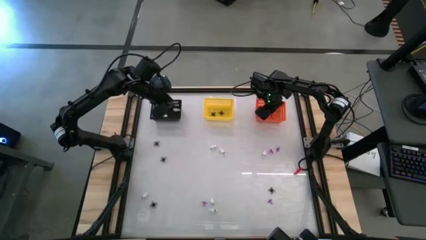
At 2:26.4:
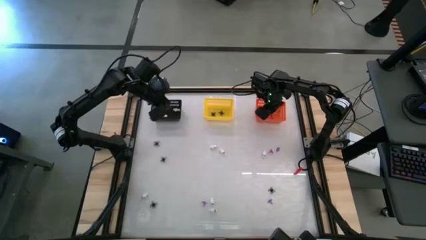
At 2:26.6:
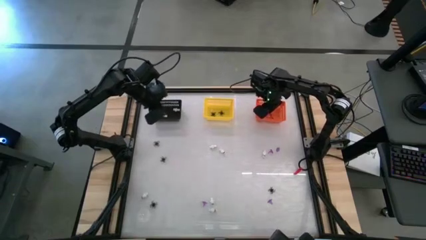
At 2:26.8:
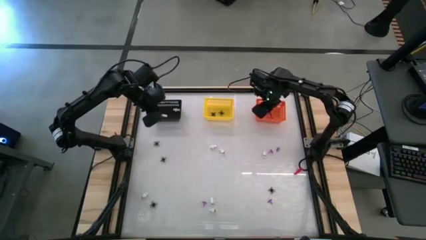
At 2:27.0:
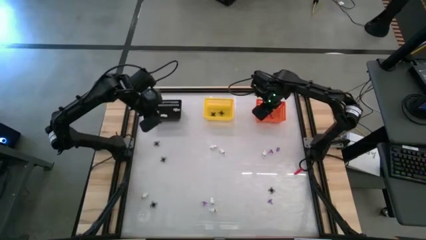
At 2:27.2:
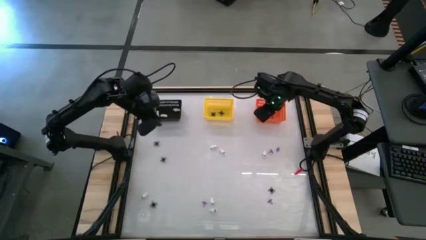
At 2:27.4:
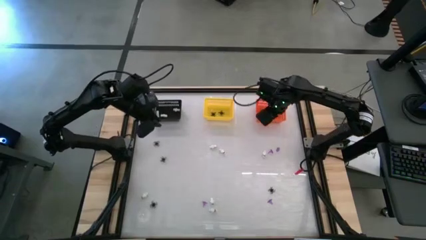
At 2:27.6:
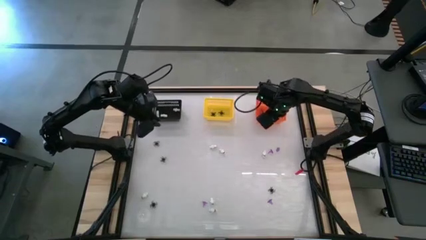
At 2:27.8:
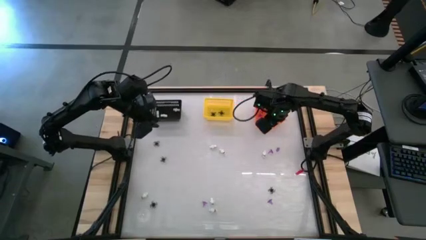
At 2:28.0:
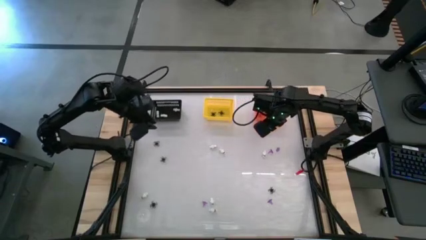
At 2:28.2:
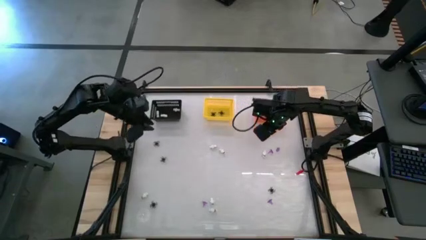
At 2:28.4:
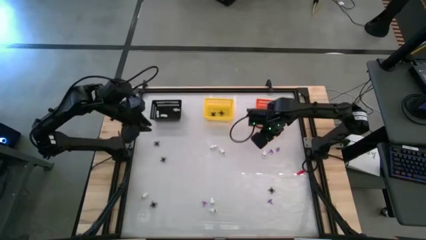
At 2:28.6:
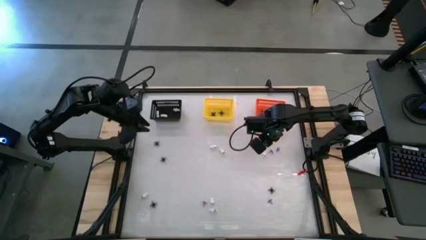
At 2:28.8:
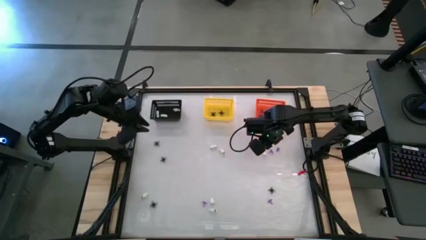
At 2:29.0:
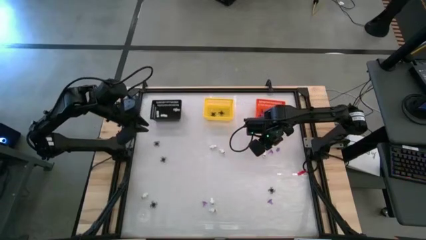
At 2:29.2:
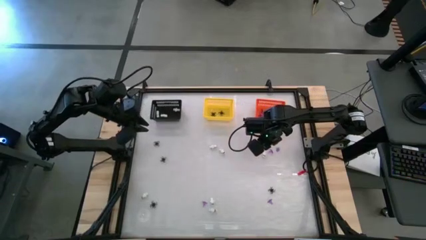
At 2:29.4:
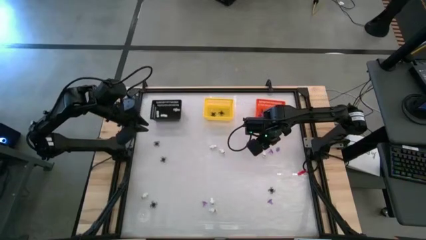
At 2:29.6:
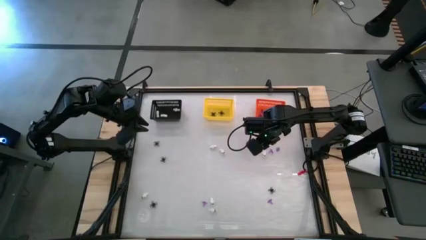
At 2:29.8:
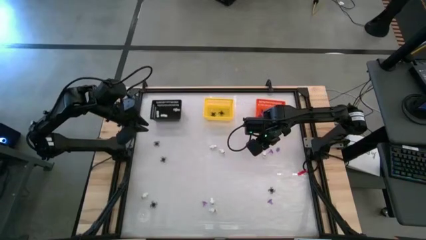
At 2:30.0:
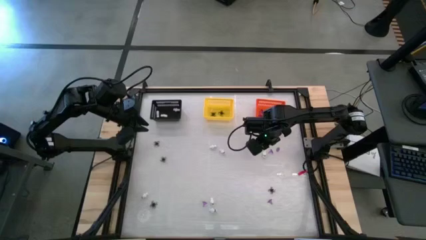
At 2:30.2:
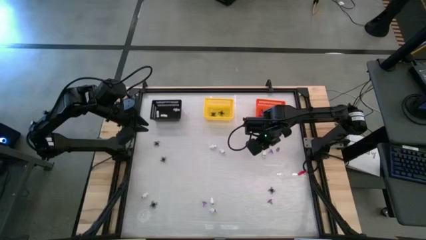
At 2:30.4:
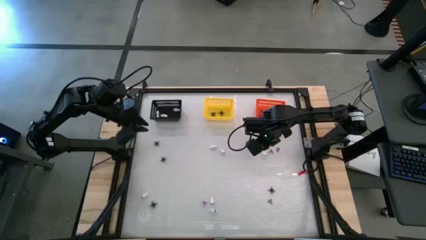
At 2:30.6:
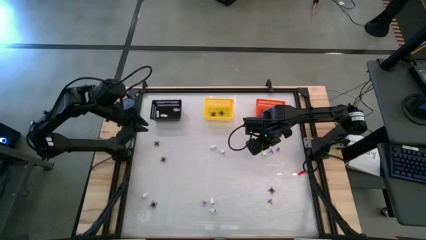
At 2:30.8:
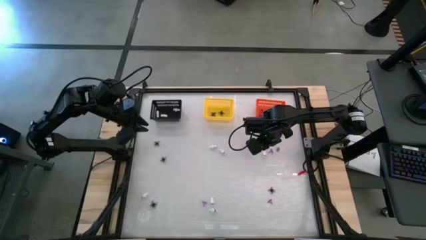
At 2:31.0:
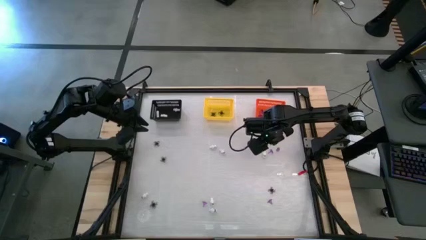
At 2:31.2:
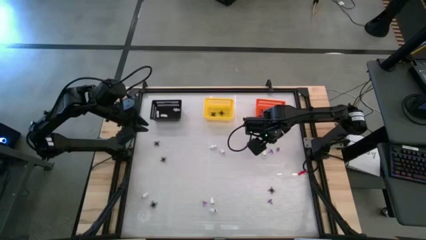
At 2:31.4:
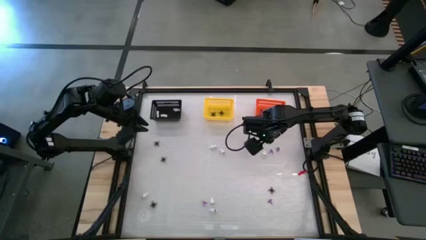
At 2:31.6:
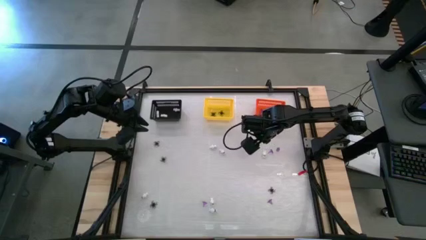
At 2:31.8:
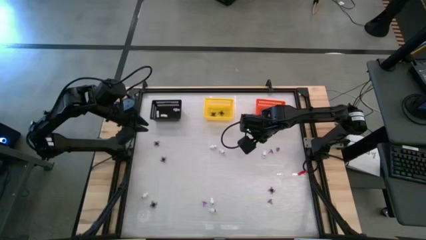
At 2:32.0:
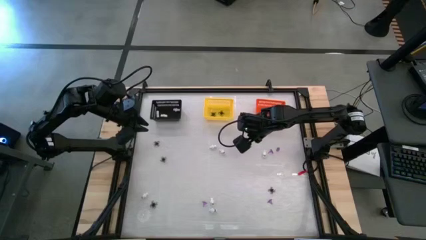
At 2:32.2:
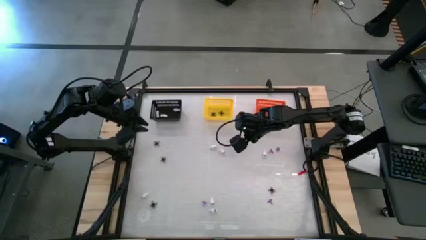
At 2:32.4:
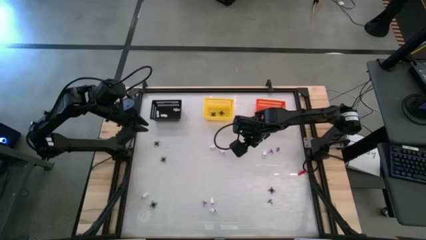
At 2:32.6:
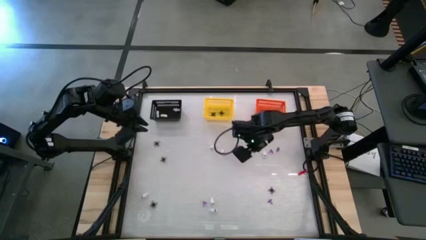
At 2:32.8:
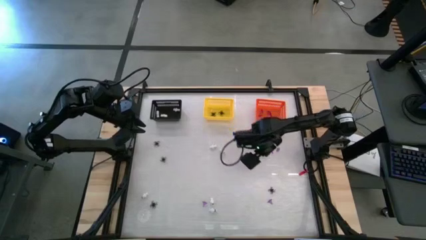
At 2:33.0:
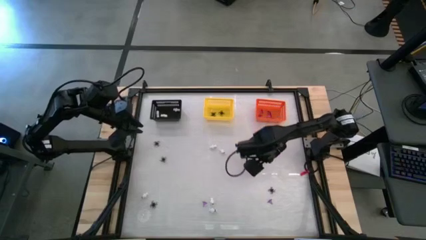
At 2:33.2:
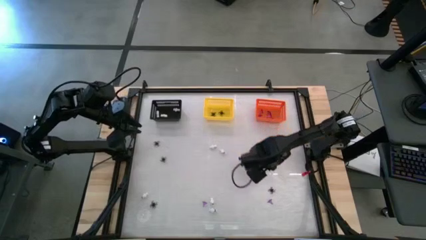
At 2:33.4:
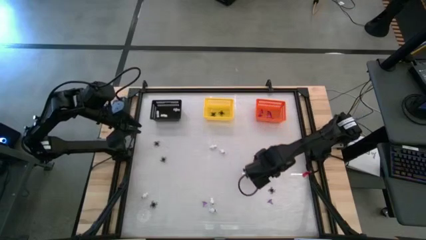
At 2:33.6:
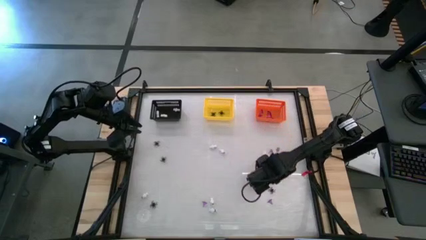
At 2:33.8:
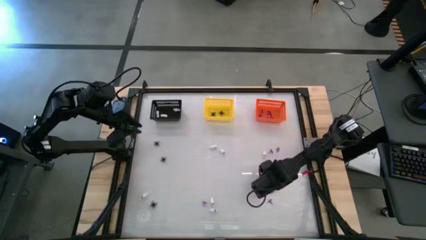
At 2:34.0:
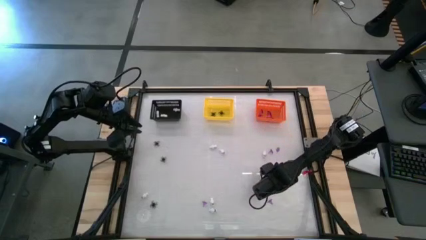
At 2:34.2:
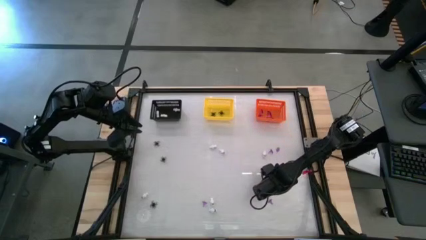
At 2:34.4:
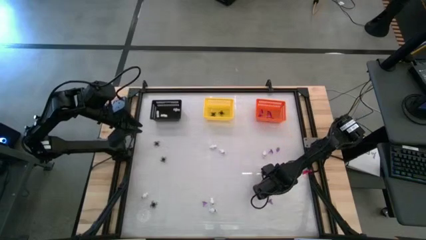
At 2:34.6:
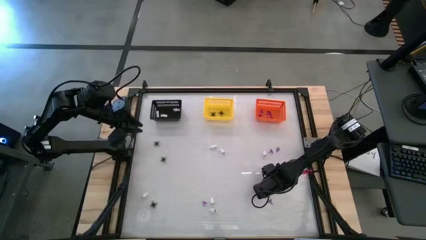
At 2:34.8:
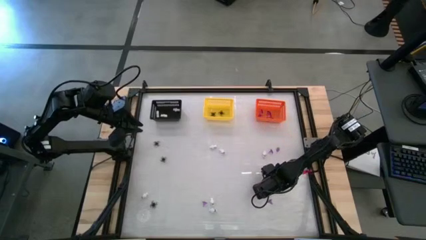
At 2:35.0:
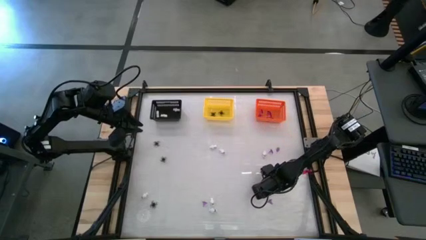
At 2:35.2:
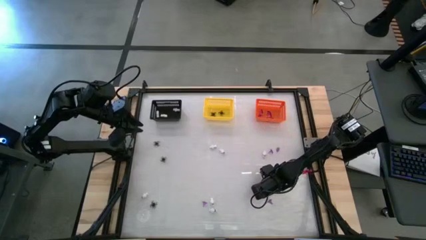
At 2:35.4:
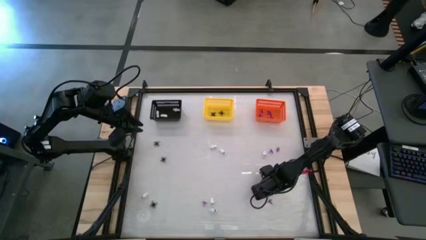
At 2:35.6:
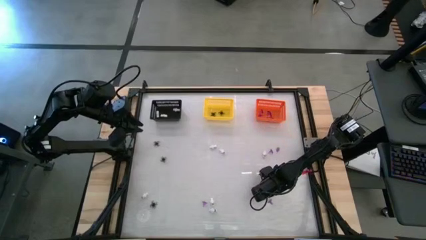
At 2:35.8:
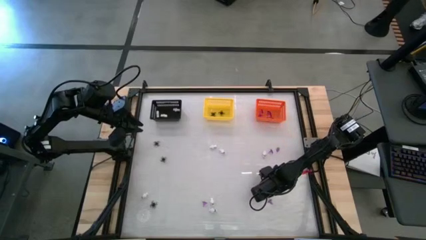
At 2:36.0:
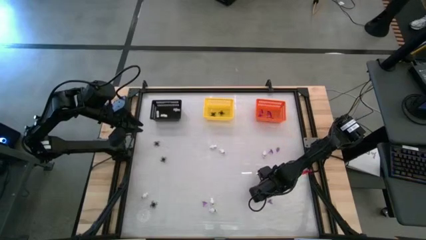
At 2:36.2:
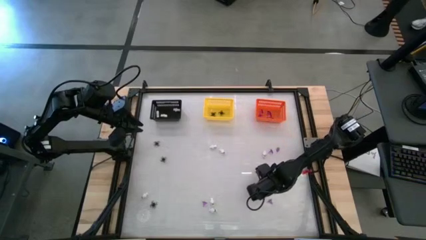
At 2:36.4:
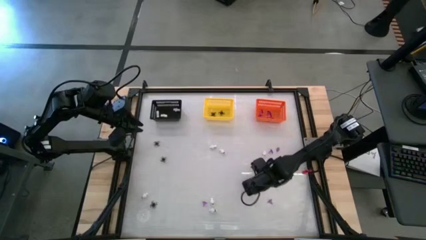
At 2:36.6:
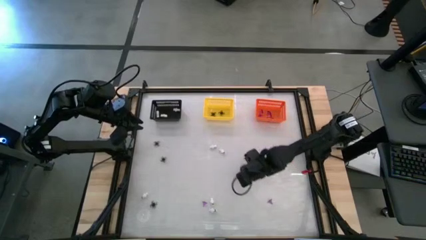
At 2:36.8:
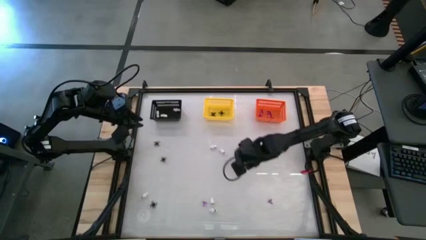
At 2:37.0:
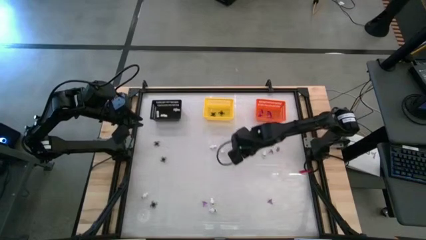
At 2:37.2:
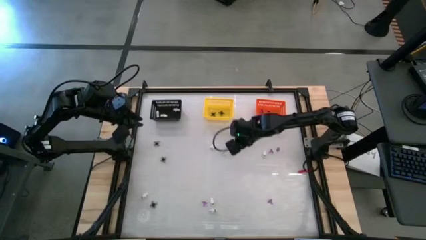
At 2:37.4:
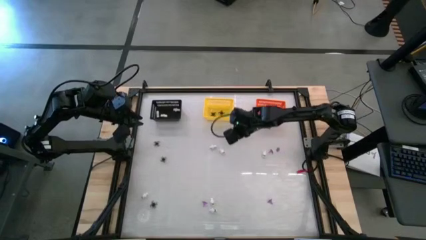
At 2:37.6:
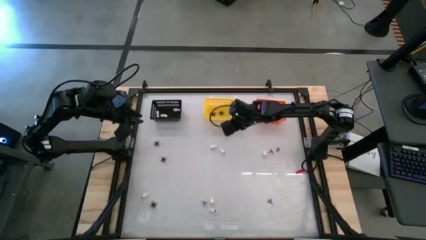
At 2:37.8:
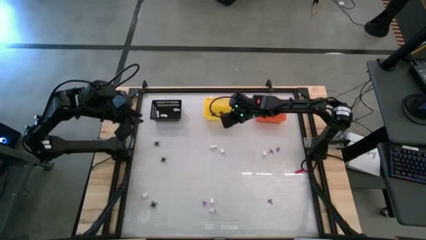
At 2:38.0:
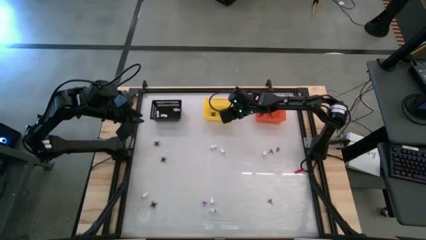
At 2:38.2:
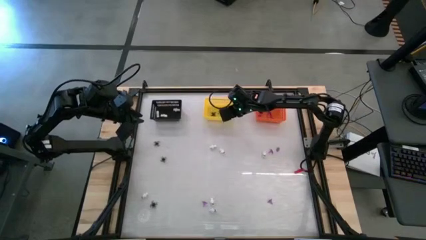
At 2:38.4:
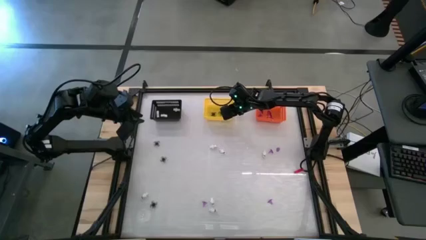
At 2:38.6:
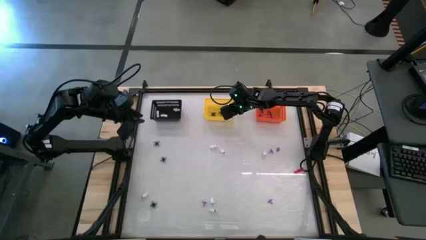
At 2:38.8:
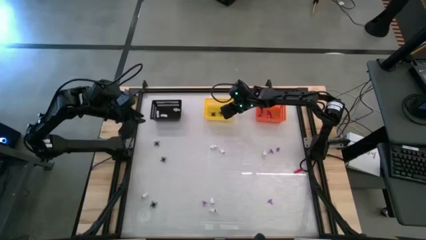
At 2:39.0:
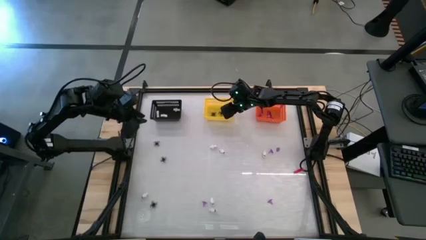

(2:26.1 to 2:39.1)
Task: Sort Halloween decoration
Put the black spider toy into the yellow basket

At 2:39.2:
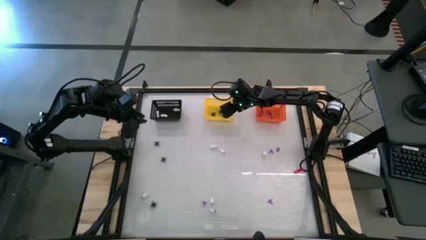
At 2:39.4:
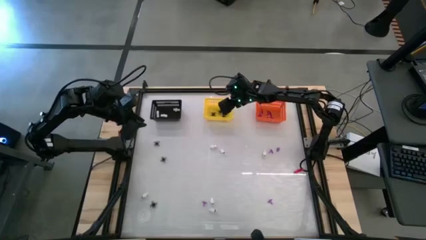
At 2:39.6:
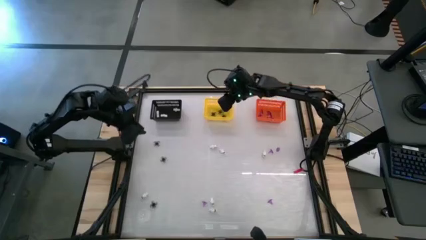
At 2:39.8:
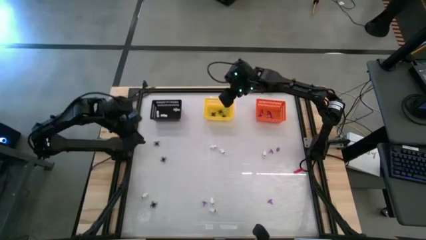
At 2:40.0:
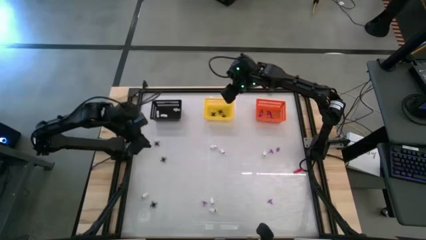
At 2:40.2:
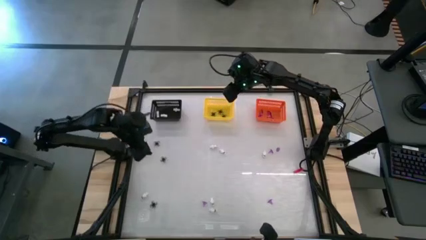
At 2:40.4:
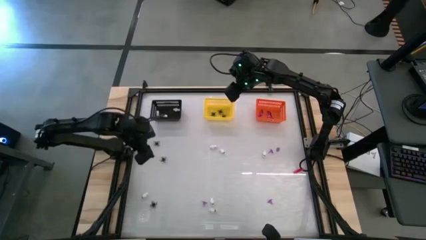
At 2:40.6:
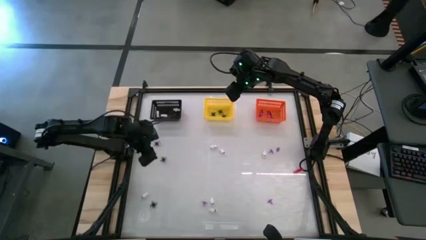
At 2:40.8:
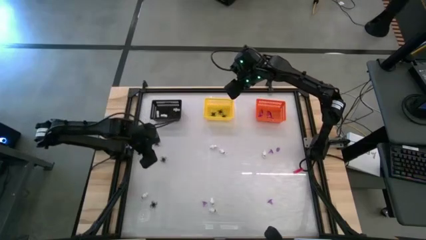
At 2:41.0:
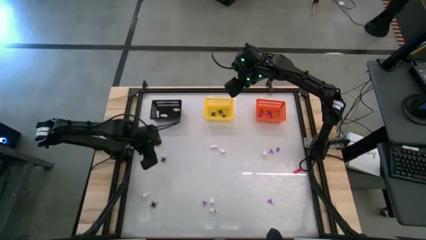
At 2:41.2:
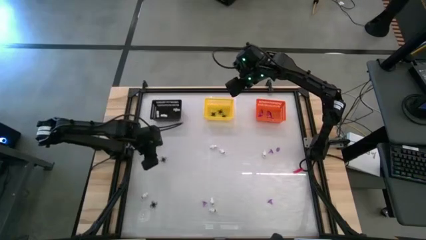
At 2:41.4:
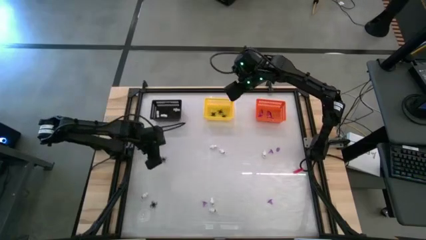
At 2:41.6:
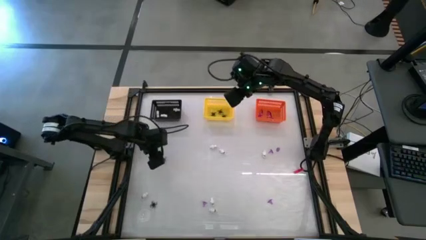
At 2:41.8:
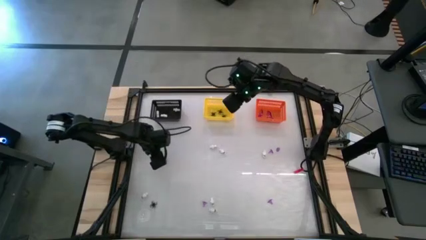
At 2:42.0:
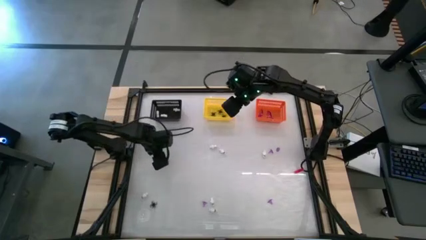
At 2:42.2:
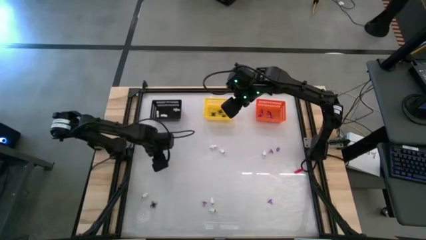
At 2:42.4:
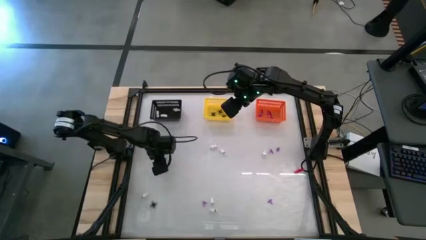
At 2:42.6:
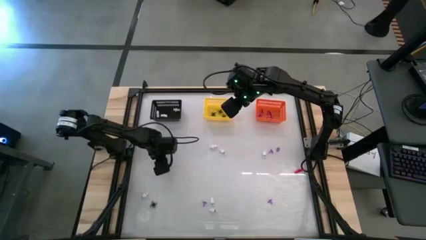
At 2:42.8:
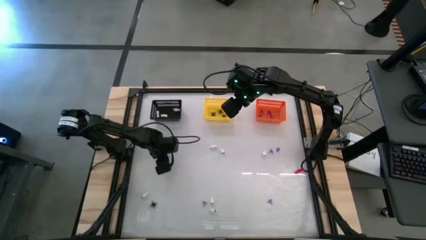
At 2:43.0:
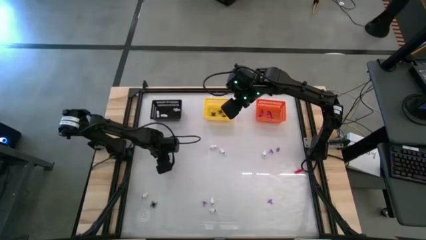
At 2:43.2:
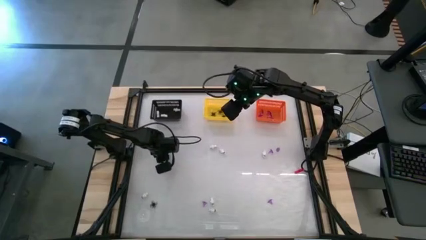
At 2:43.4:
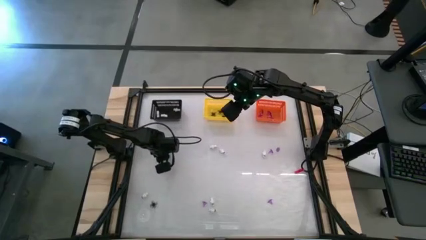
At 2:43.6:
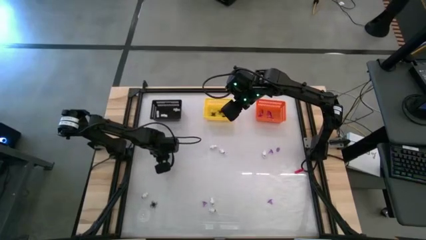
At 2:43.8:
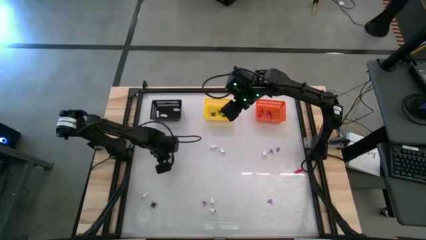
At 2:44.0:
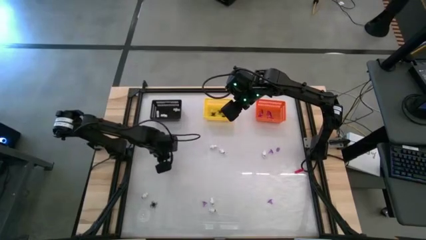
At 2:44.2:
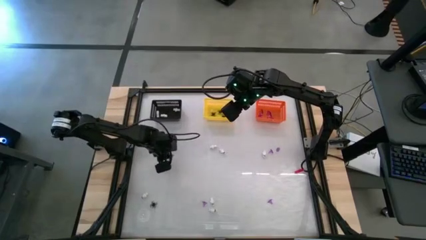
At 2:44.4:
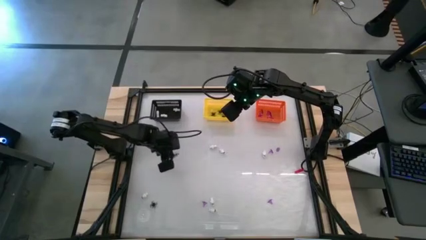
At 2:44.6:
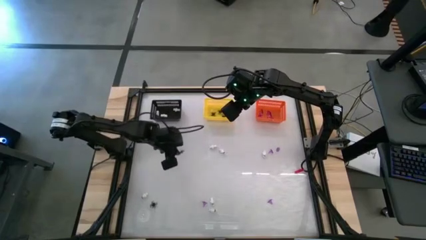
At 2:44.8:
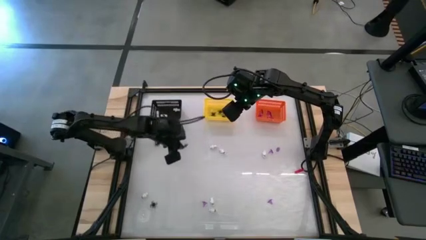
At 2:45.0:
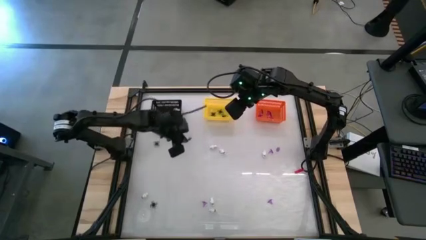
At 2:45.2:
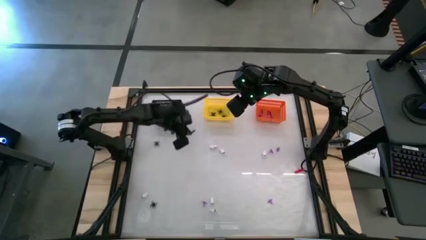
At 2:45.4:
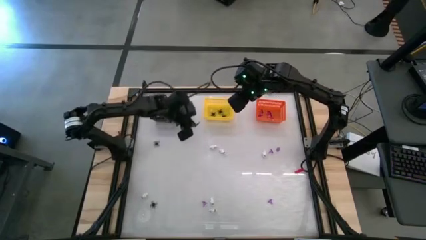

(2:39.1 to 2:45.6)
Put the black spider toy into the yellow basket
